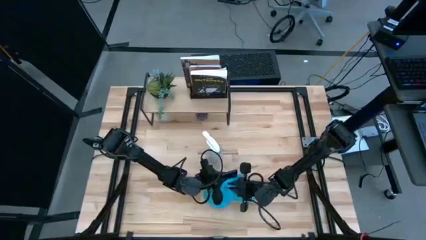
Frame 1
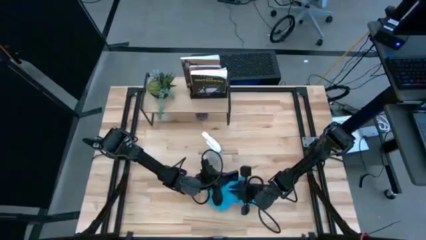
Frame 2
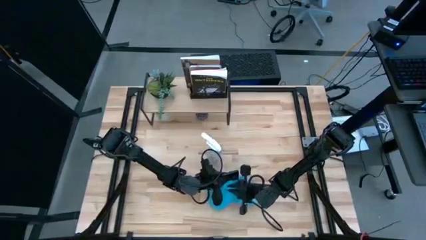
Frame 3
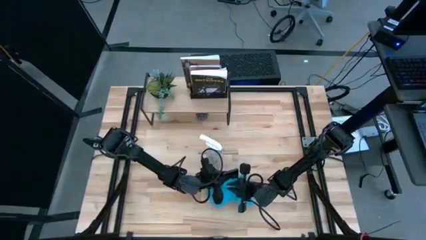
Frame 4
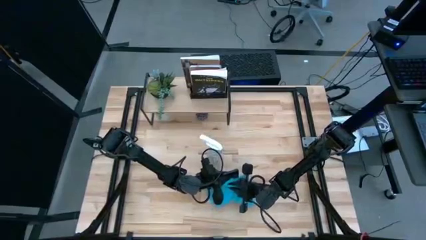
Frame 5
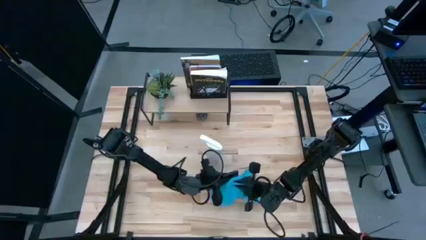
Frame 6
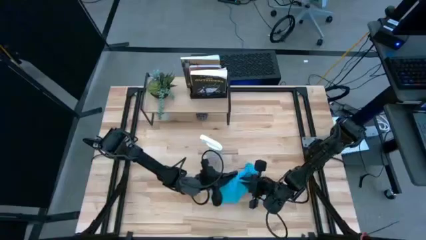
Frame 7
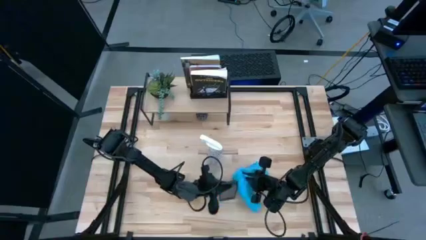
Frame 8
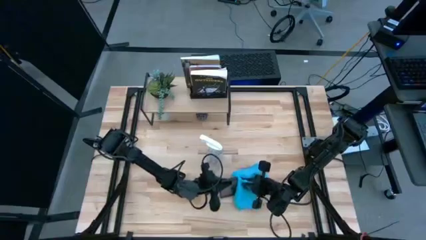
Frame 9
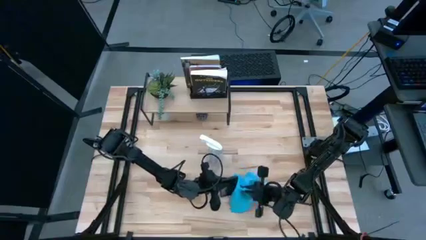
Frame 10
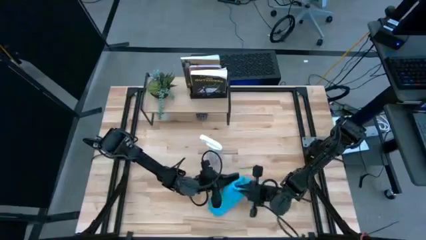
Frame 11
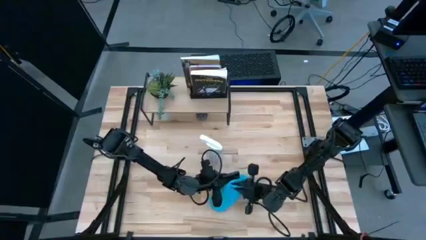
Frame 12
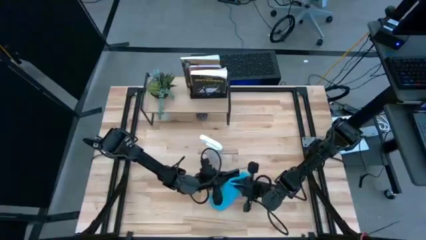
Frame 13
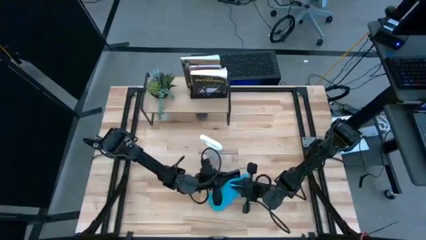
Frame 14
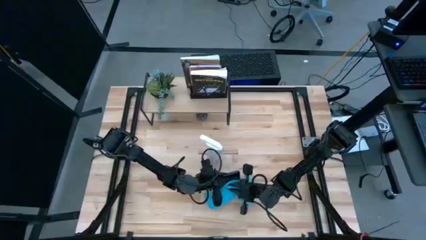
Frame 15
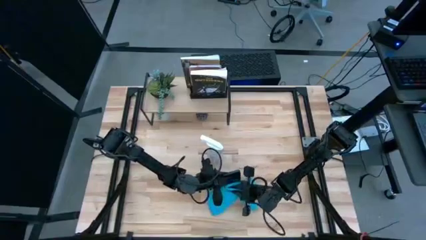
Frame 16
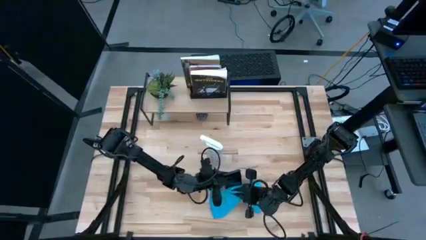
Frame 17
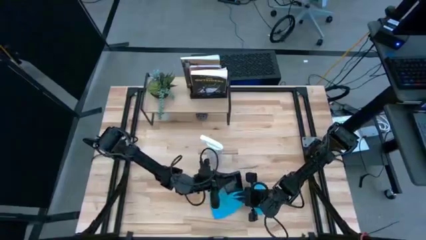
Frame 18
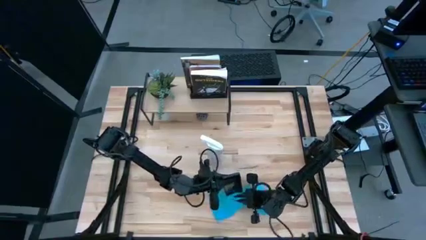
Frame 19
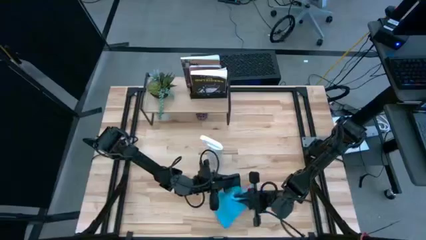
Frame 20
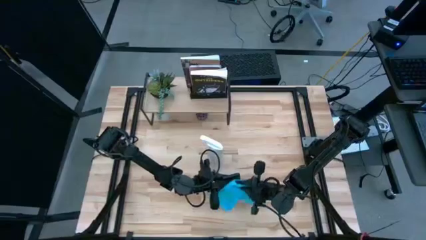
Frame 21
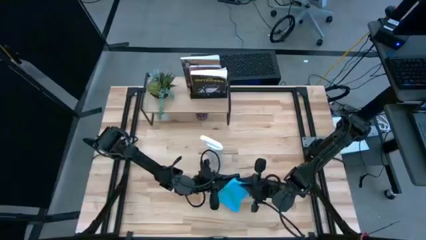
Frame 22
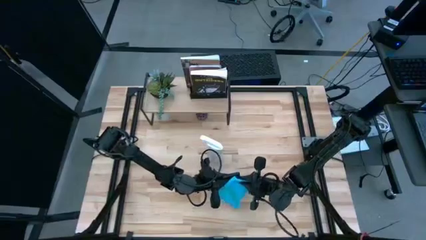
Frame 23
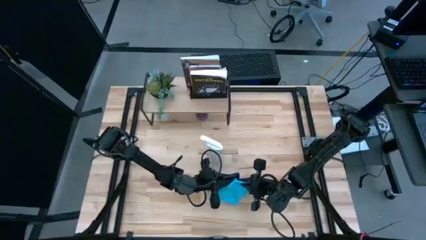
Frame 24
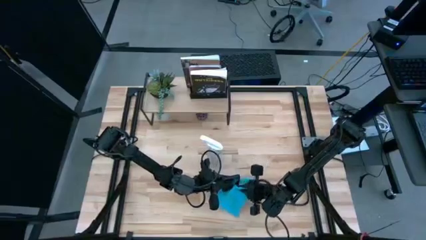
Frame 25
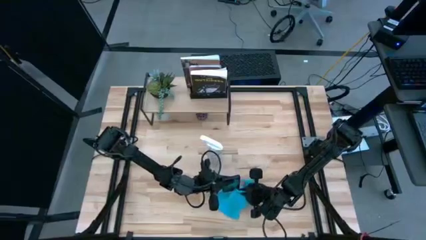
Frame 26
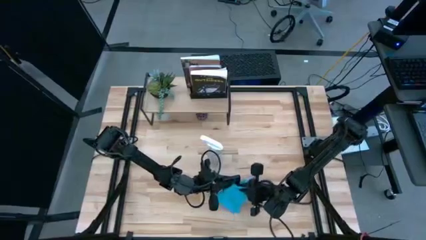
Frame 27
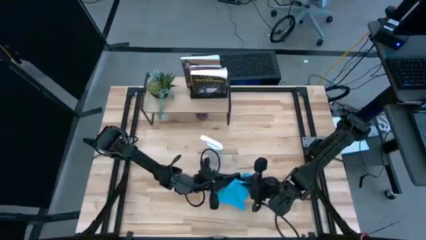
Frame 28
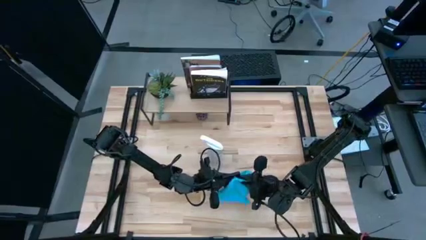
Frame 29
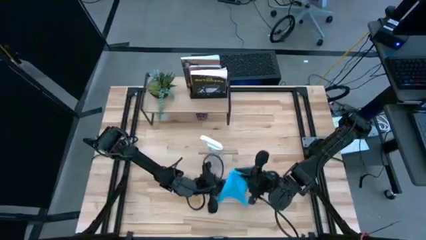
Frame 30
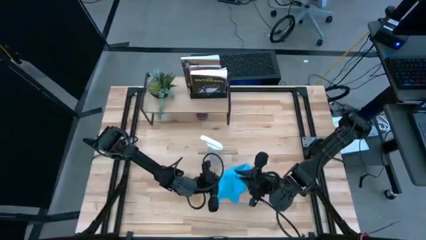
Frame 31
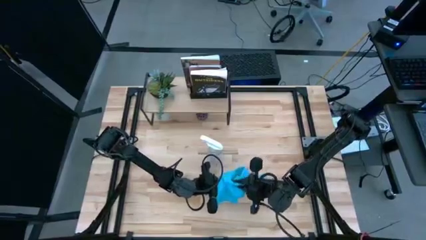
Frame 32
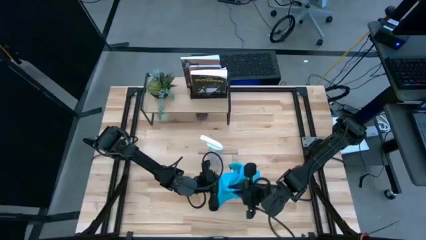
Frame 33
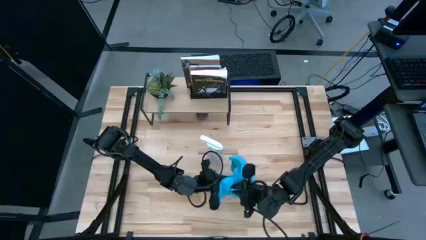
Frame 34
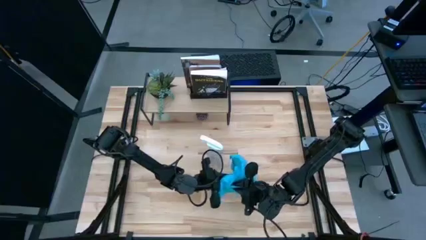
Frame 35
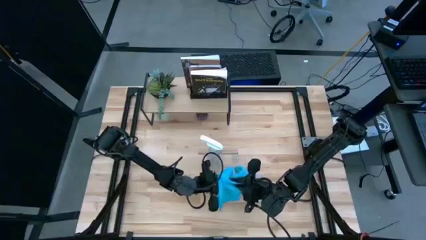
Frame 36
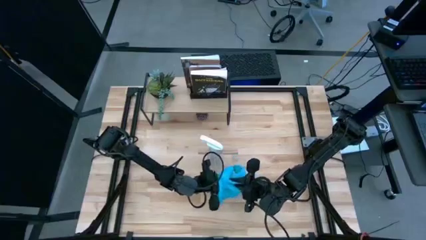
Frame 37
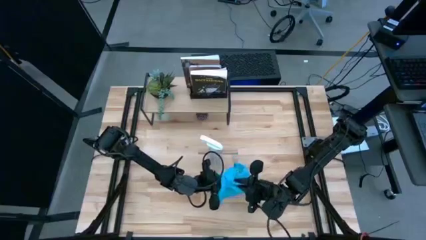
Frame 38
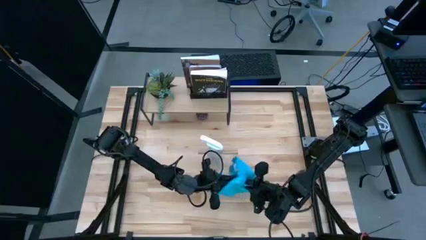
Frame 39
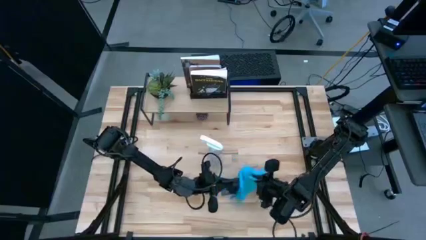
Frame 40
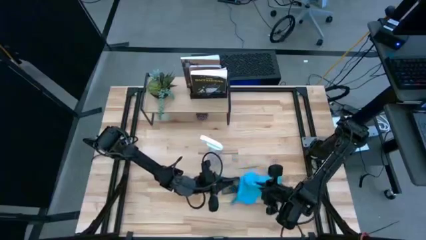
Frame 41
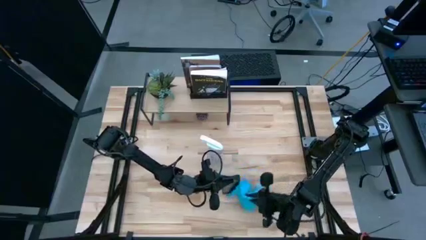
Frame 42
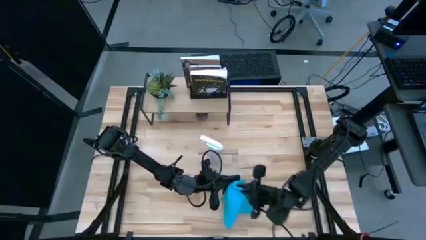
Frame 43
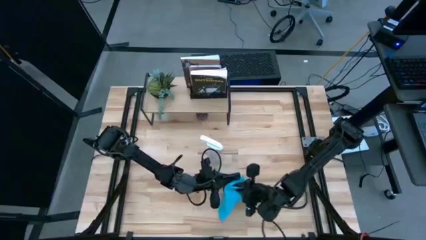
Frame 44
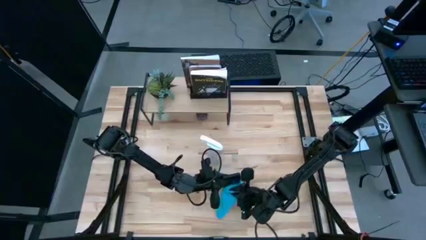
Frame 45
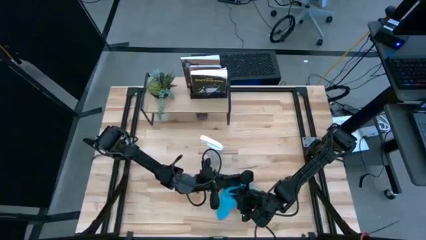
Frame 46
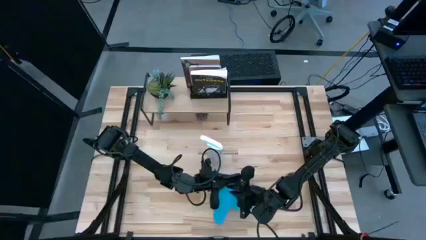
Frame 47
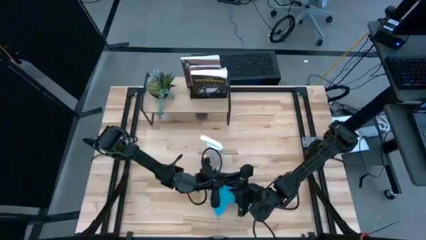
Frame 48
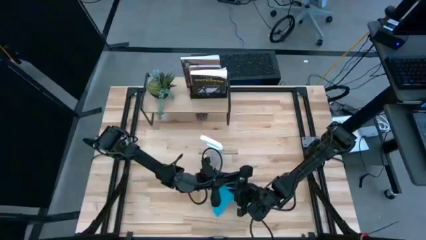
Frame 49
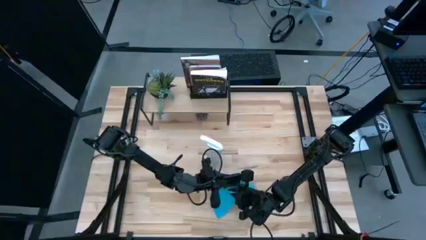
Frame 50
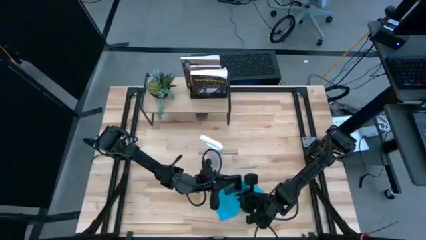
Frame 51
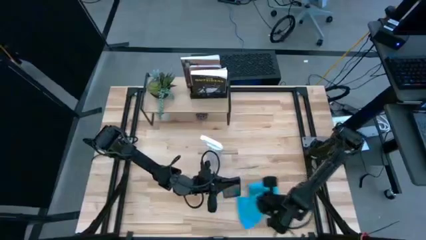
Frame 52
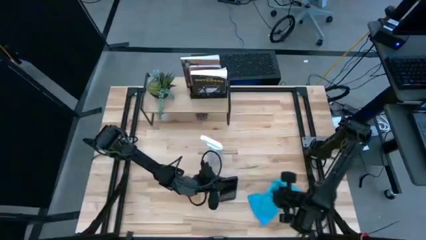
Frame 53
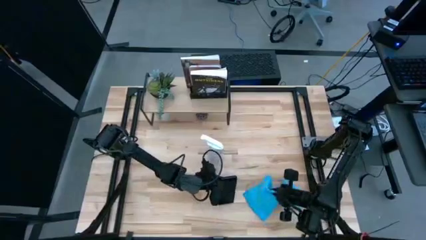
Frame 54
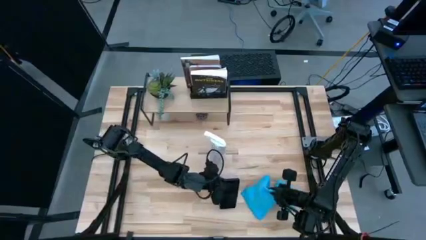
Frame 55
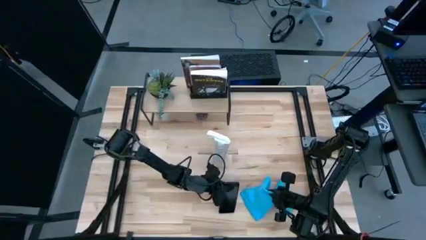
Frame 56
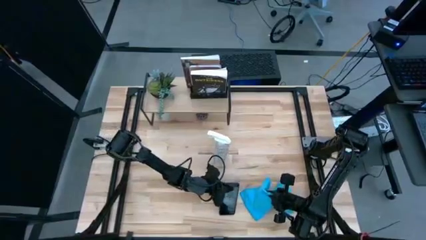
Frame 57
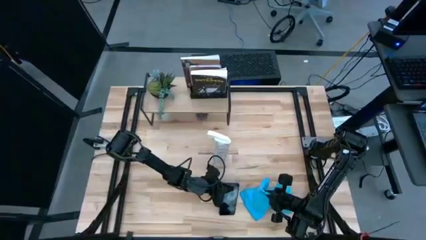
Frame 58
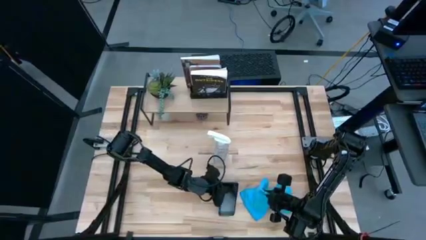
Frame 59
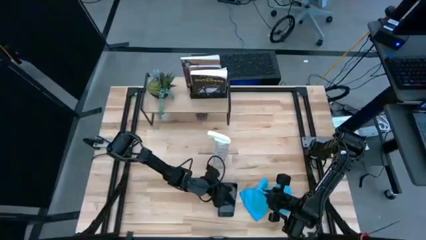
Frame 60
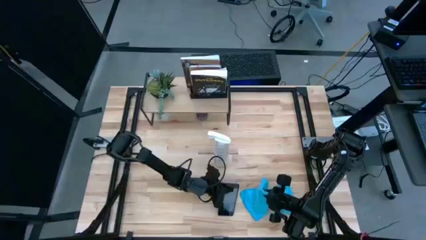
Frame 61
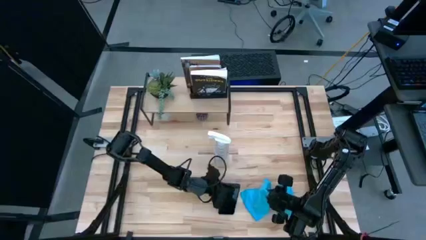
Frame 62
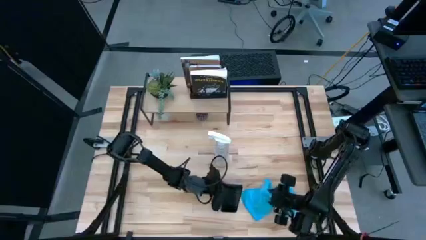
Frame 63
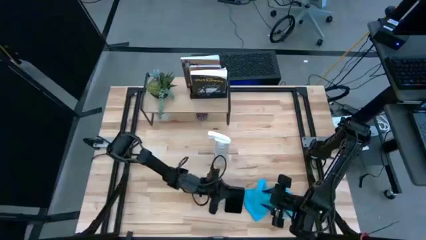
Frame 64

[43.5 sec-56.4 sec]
Task: Apply microfiber cloth
Wipe the front of the black cellphone with a blue microfiber cloth

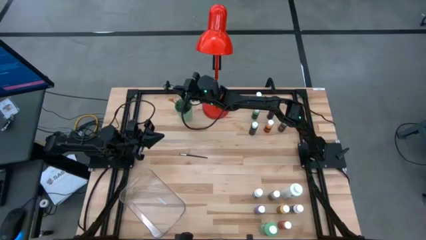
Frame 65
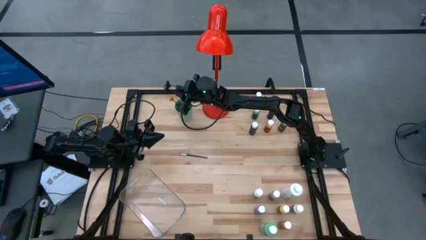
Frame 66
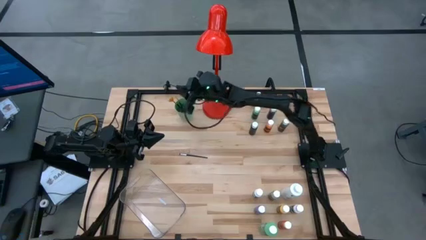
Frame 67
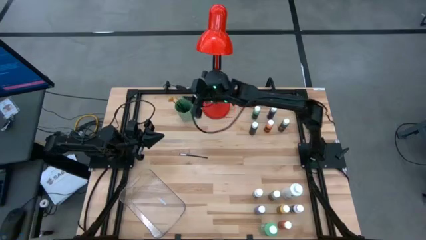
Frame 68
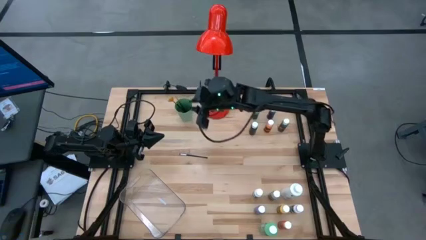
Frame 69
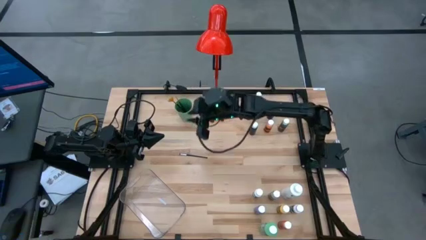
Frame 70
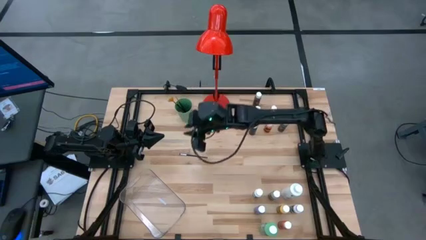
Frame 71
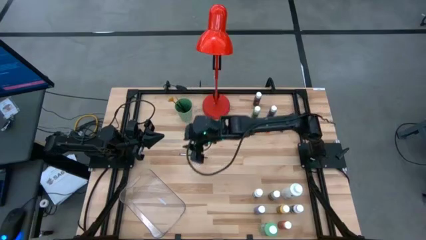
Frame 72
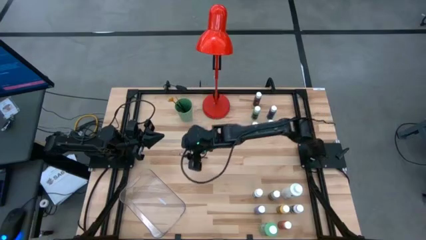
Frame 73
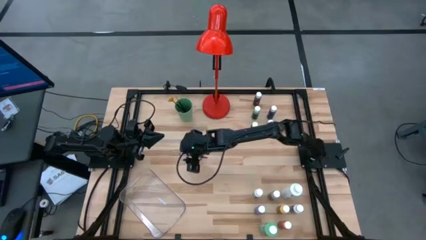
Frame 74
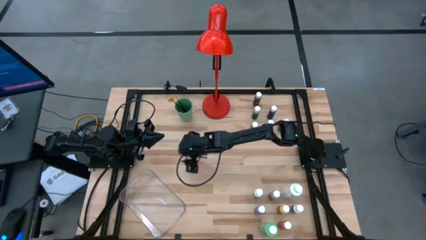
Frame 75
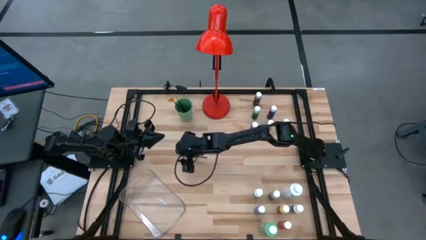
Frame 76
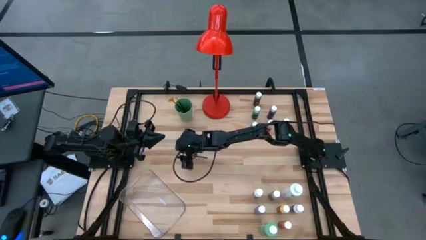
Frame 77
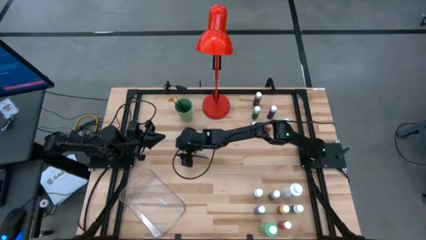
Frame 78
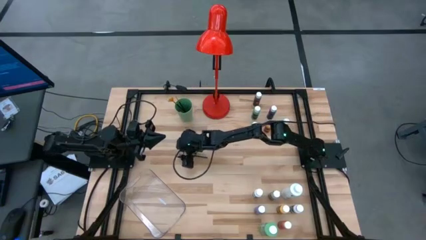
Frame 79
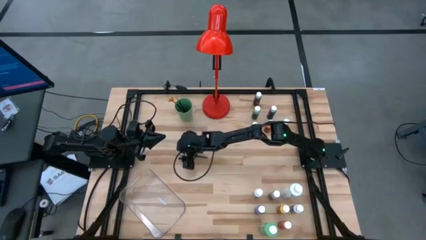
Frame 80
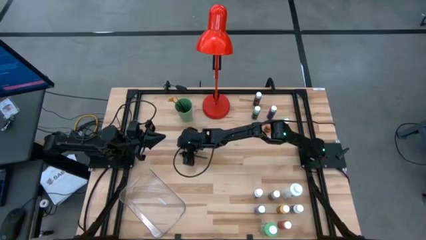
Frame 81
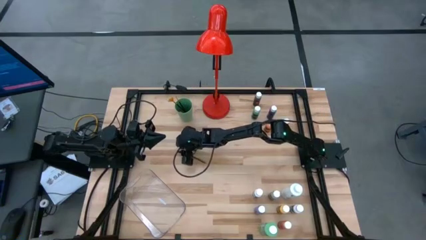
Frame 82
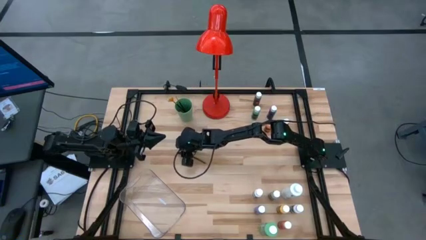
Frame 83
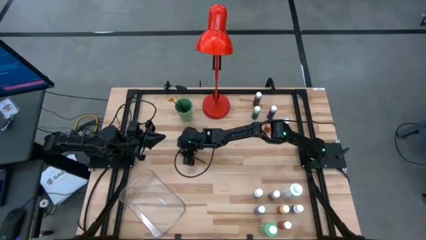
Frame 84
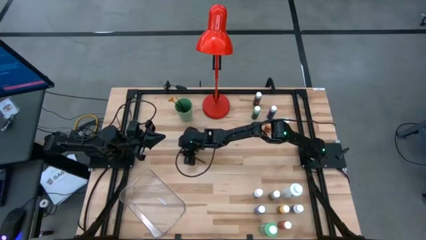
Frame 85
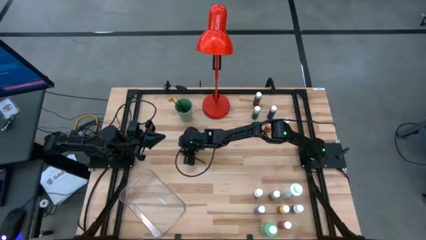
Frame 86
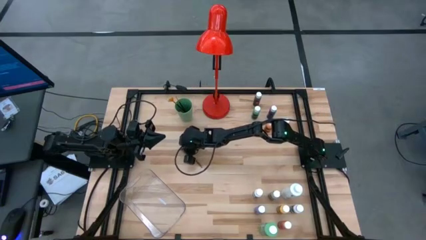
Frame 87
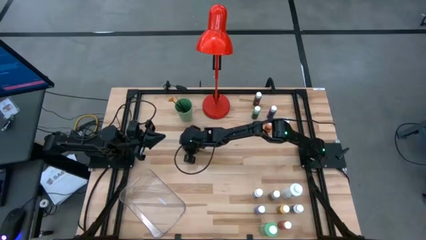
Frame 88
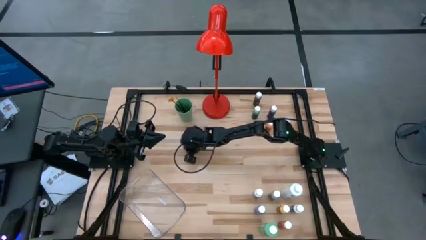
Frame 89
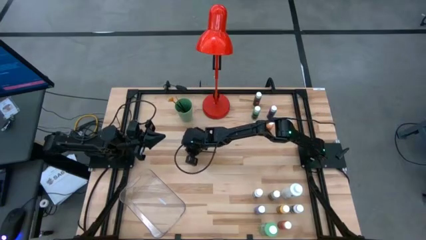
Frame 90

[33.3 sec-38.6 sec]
Task: Pick & Place Paint Supplies
Put the silver paint brush into the green cup
